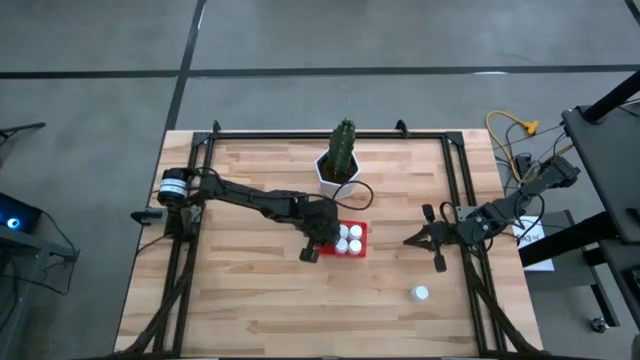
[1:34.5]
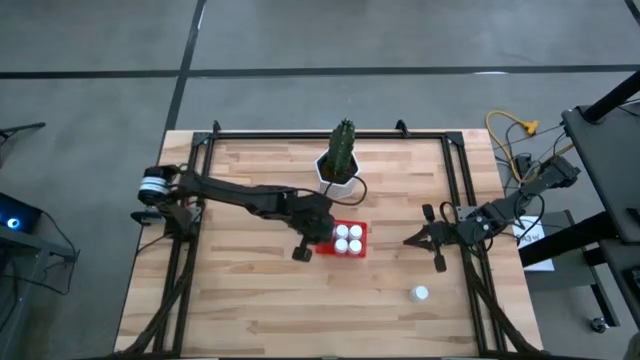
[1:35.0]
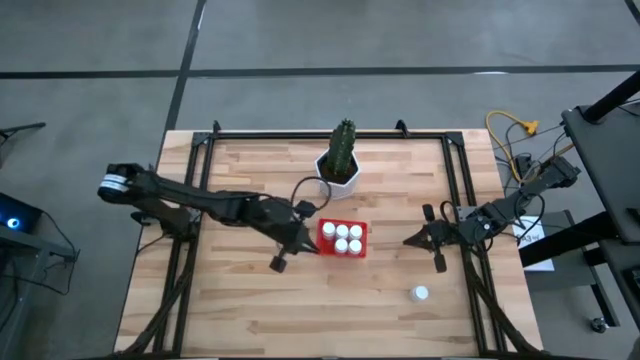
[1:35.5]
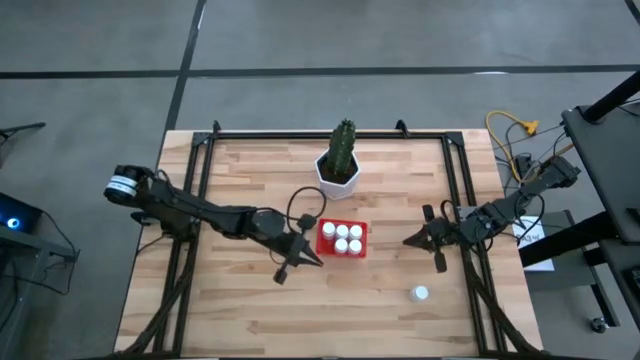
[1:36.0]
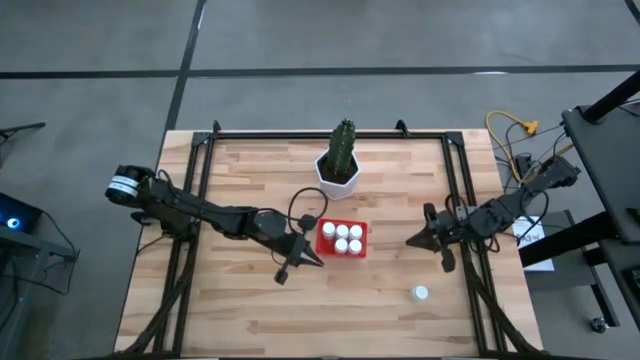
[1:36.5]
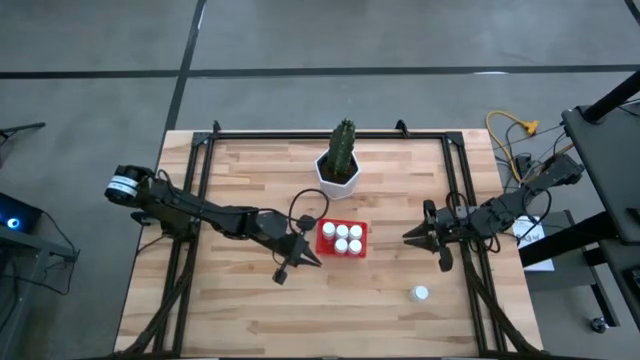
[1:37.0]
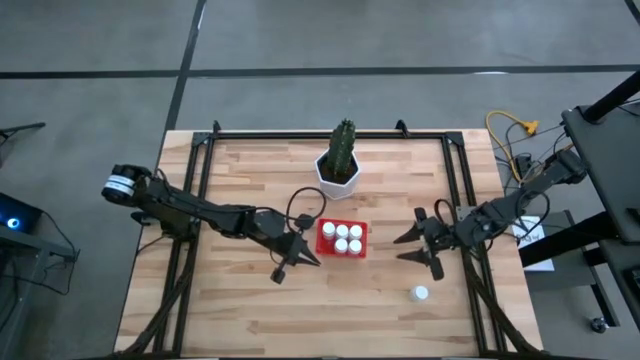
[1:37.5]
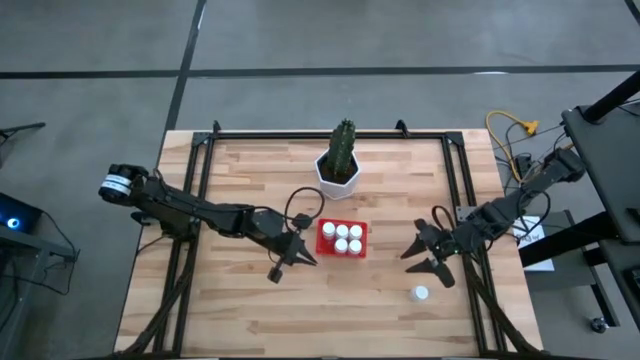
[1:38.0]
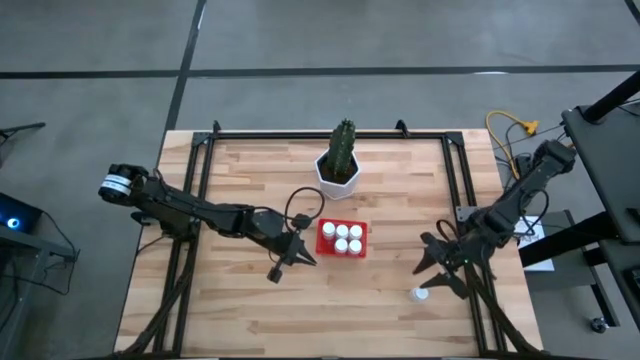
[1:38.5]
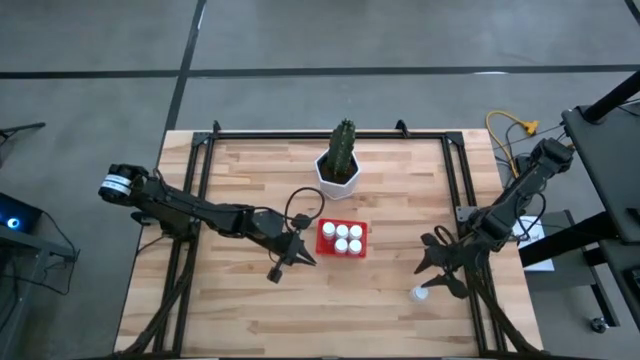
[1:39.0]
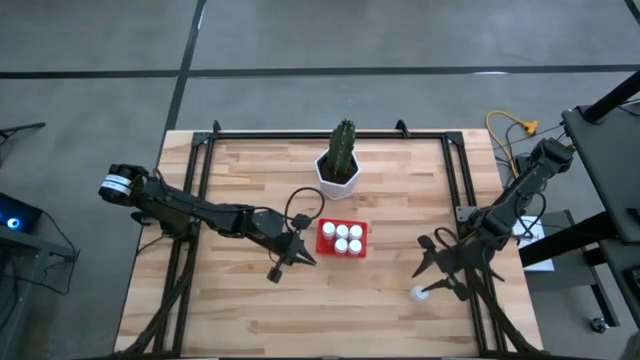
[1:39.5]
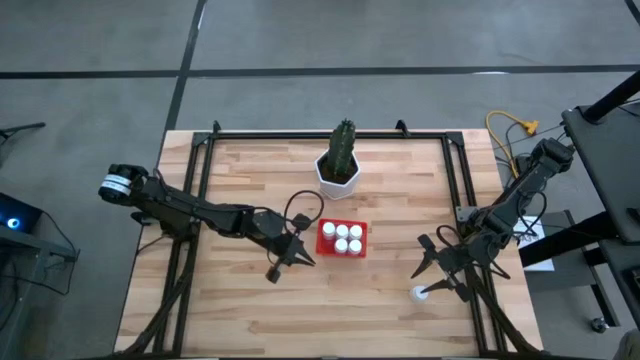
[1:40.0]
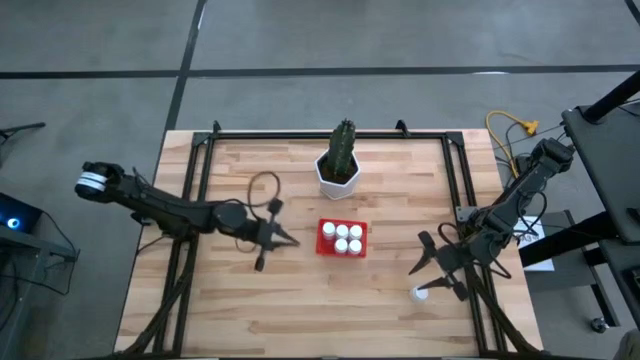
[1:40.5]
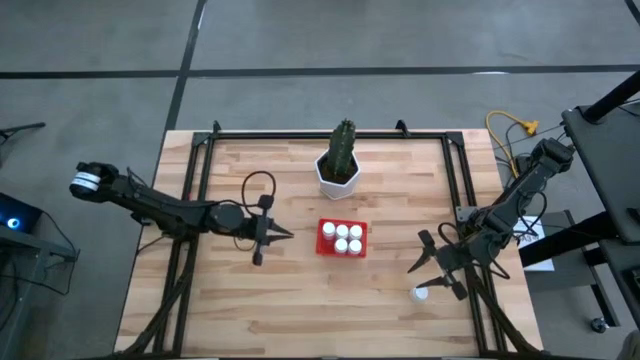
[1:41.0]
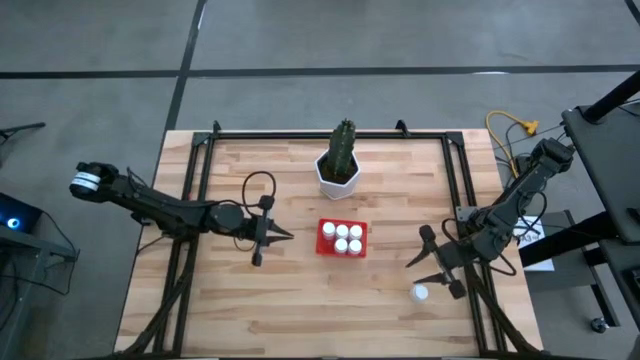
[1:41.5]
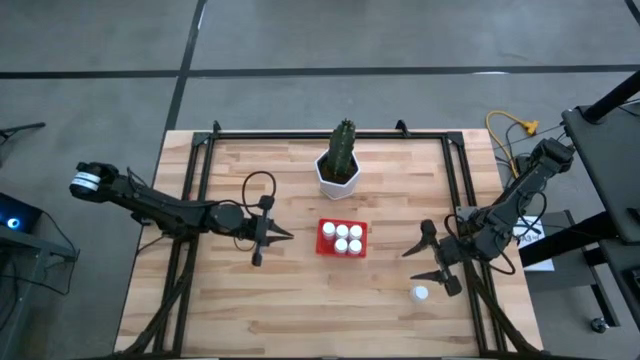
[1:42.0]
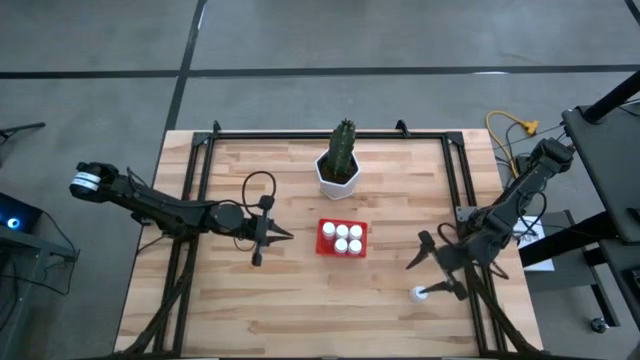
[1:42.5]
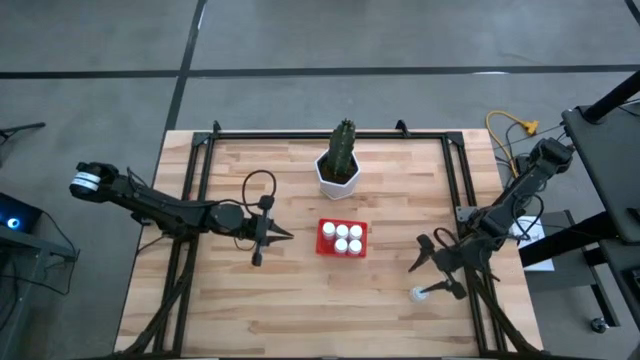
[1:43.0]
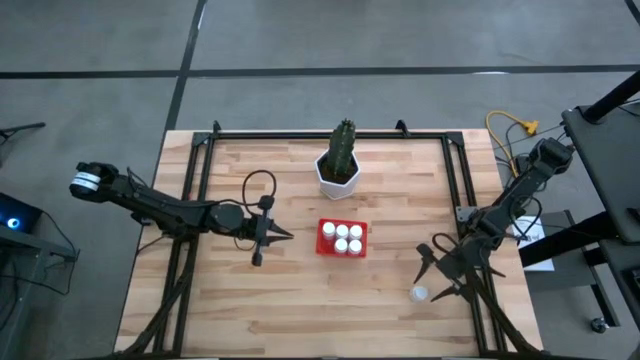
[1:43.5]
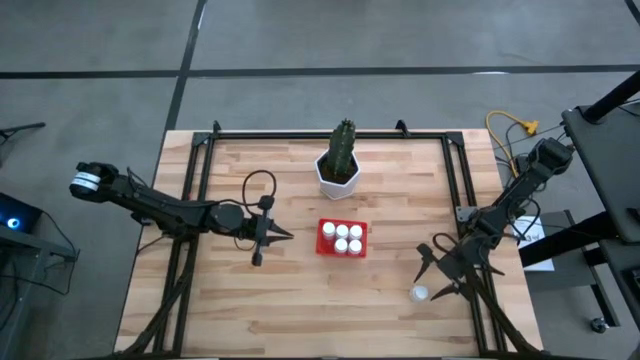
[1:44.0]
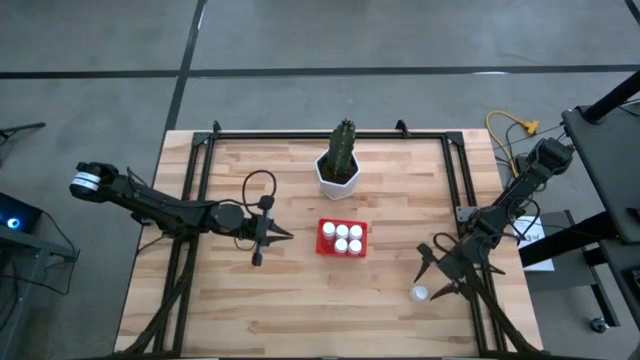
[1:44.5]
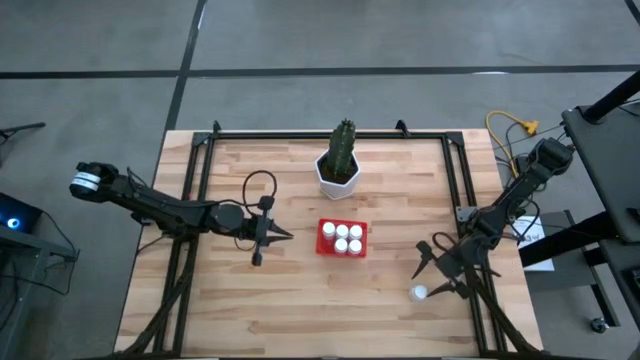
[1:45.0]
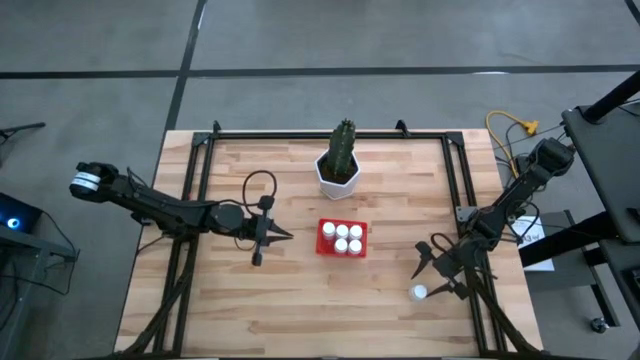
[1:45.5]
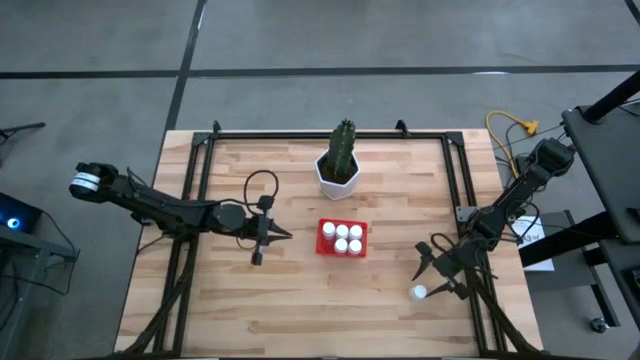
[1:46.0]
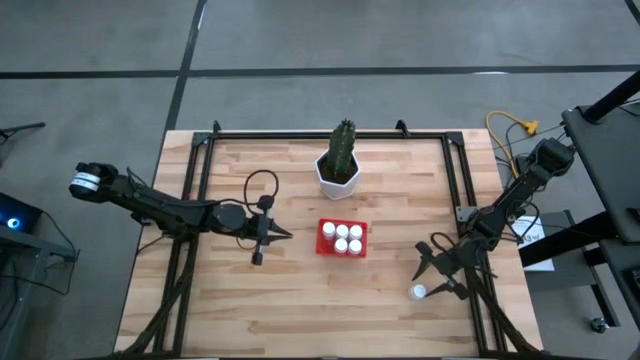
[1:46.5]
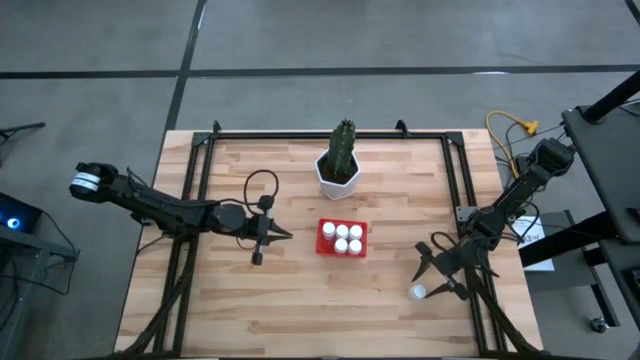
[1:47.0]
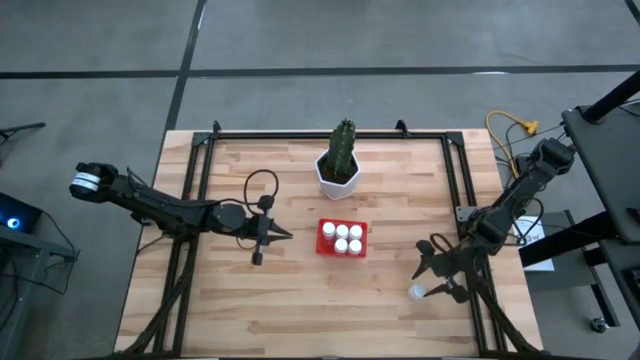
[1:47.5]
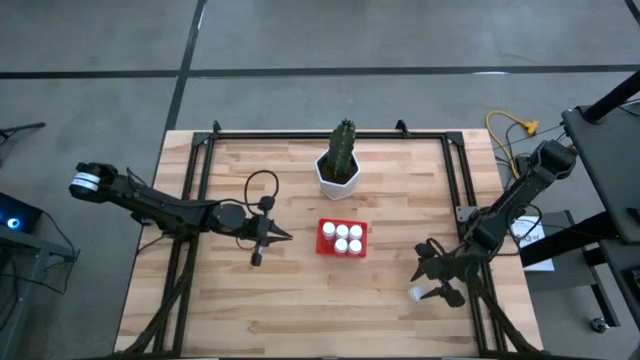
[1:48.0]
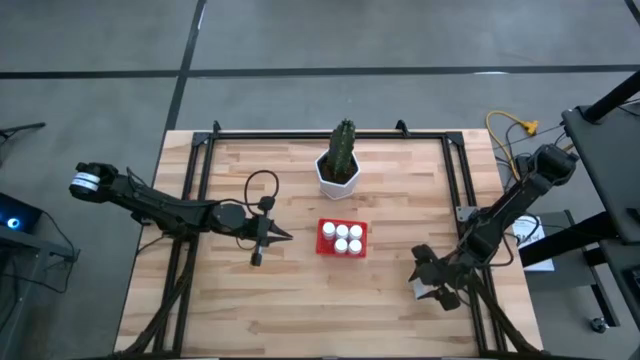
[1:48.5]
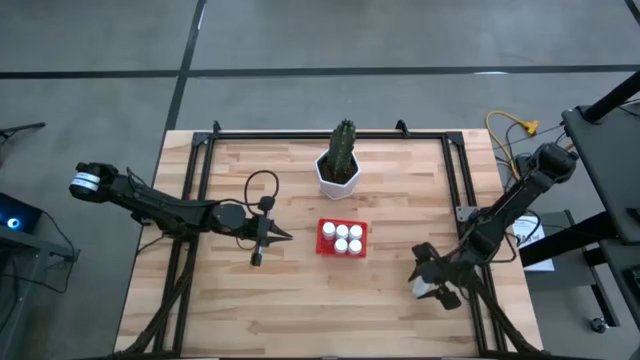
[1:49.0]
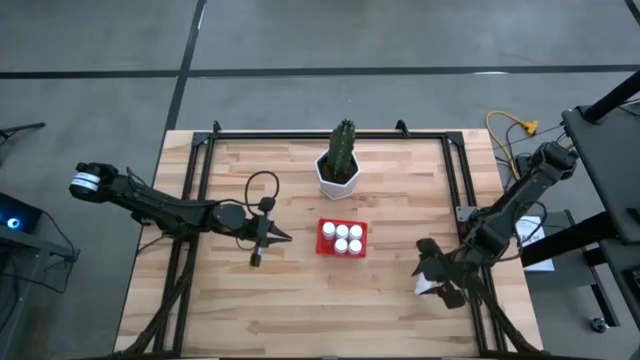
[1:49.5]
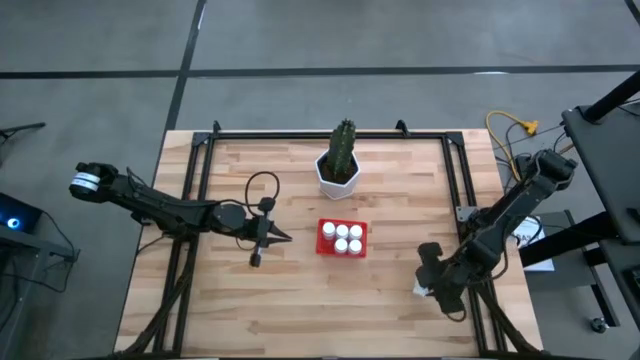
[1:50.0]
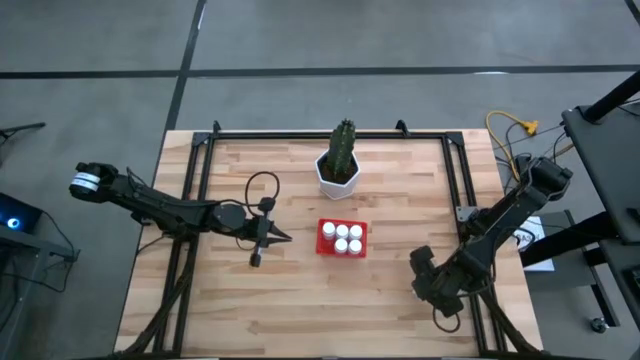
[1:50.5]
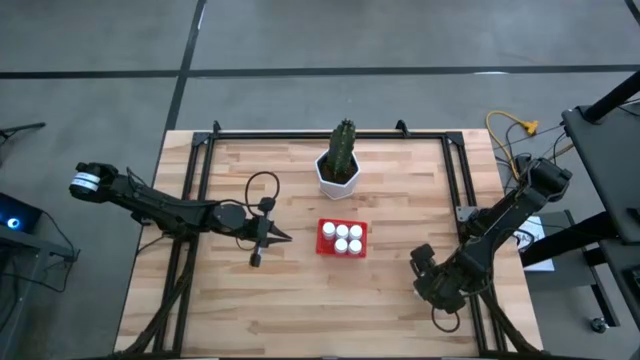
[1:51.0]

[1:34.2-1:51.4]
Task: Pick and place pill bottles into a basket
Put the white pill bottle into the red bin

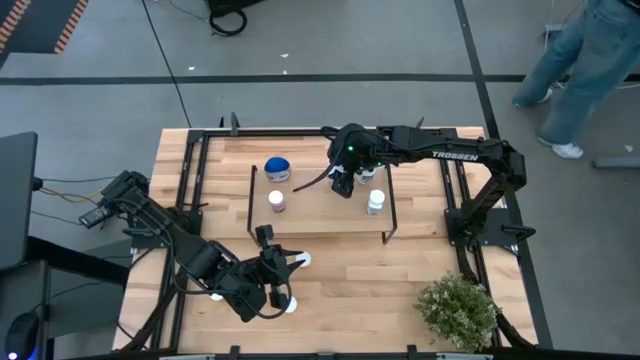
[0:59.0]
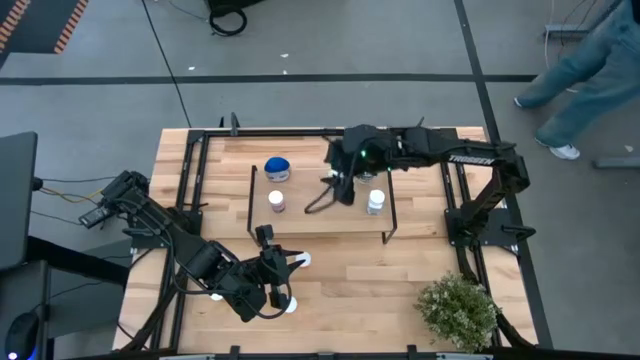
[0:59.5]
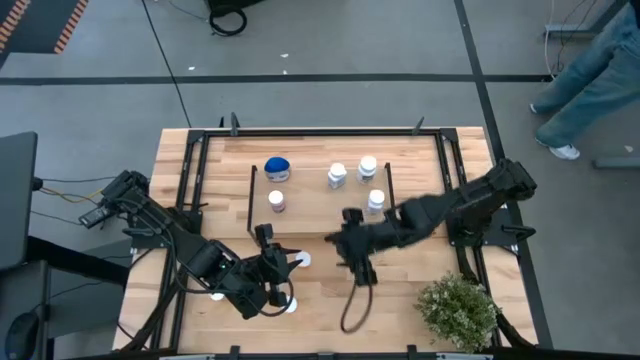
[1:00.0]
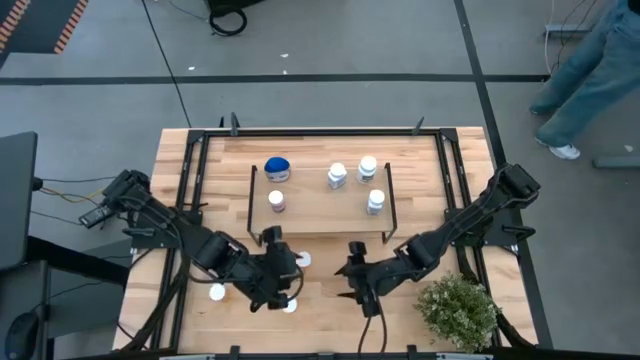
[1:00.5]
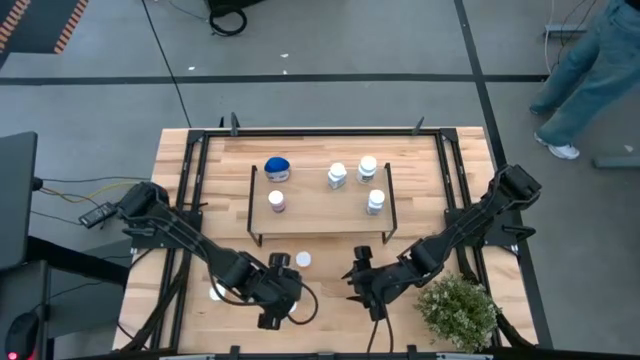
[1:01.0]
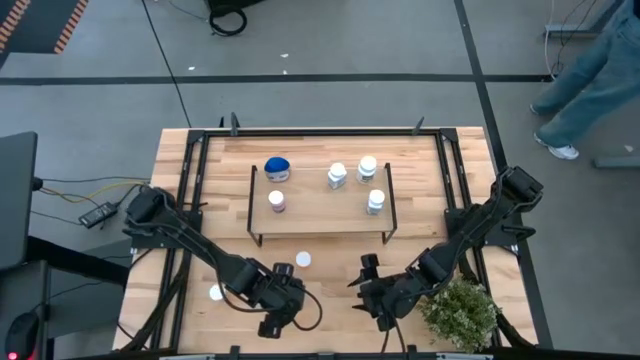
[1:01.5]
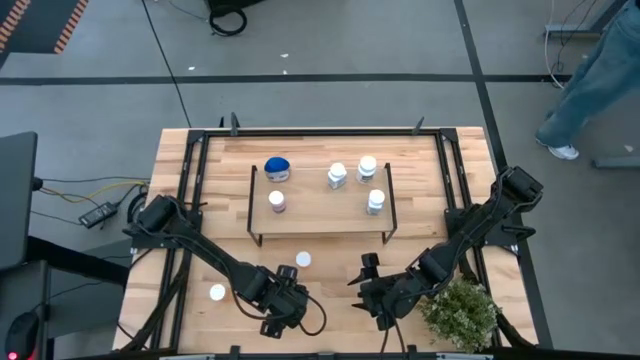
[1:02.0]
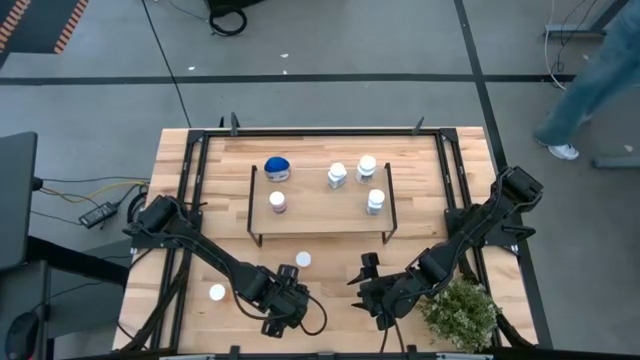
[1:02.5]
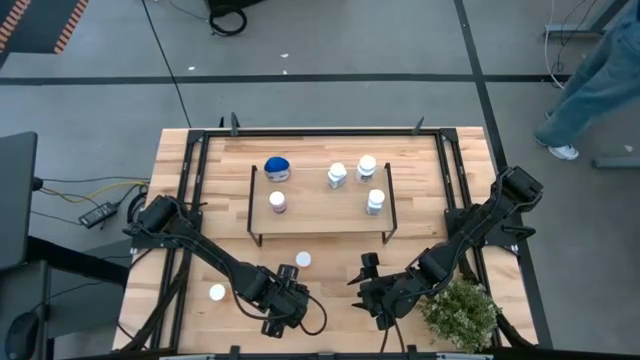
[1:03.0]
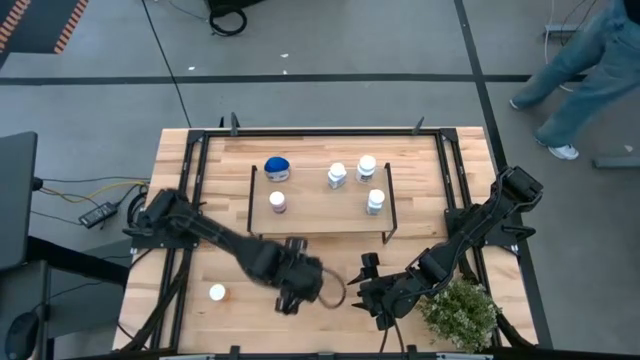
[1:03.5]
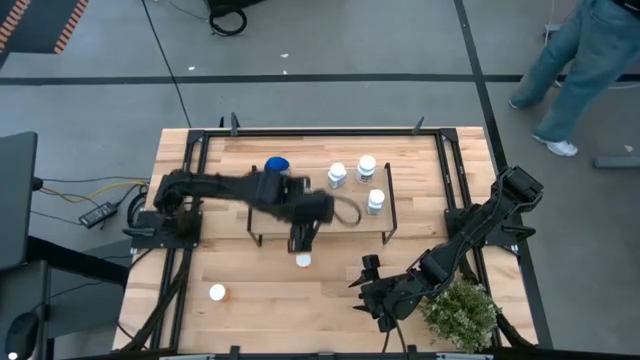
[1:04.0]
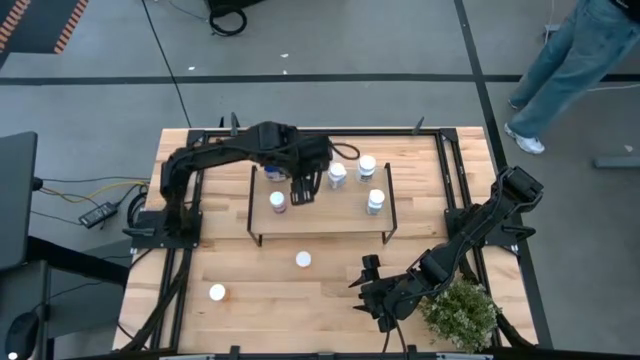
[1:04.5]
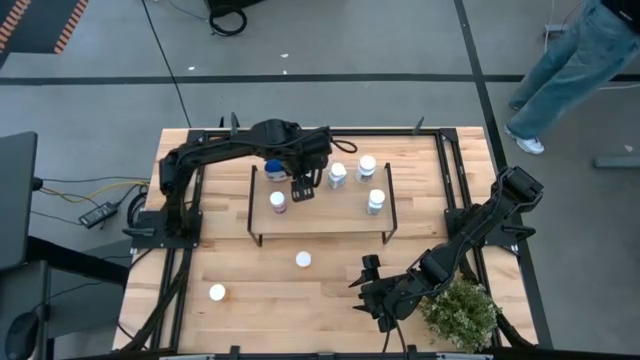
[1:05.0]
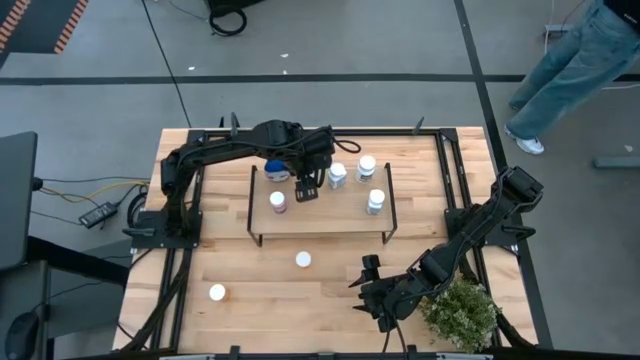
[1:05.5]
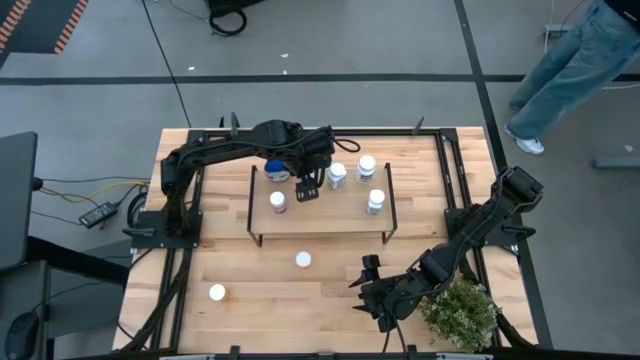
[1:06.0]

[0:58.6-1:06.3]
Task: Pick and place medicine bottles onto shelf by color
Put the orange medicine bottle on the bottom right of the shelf
